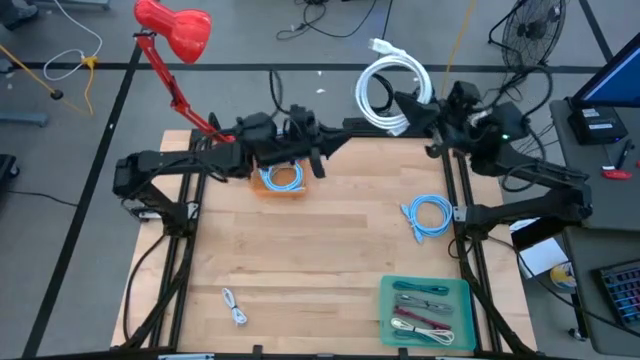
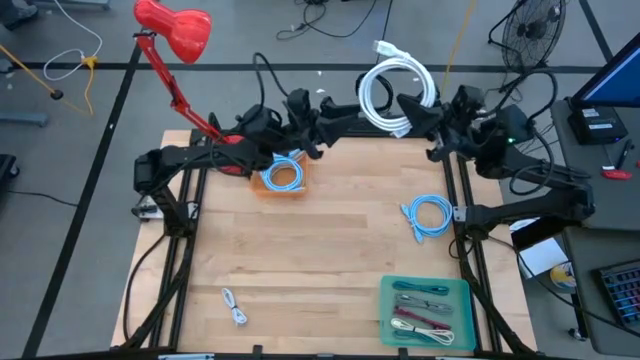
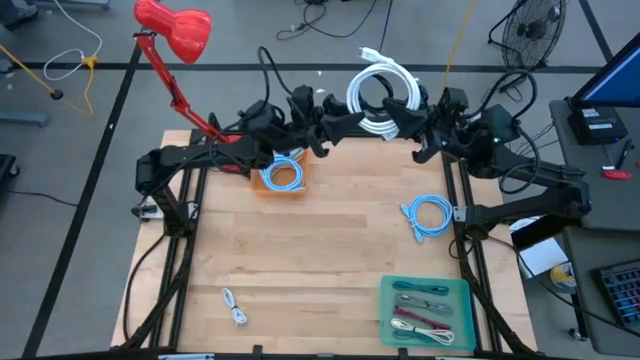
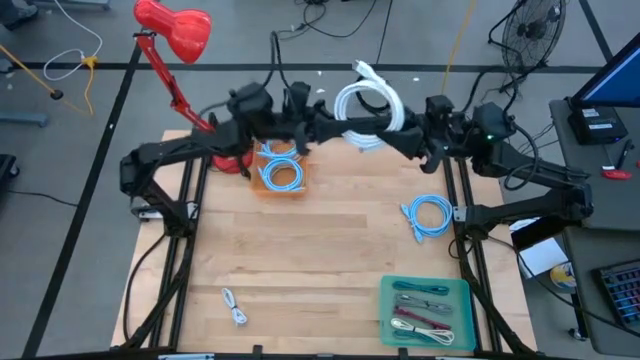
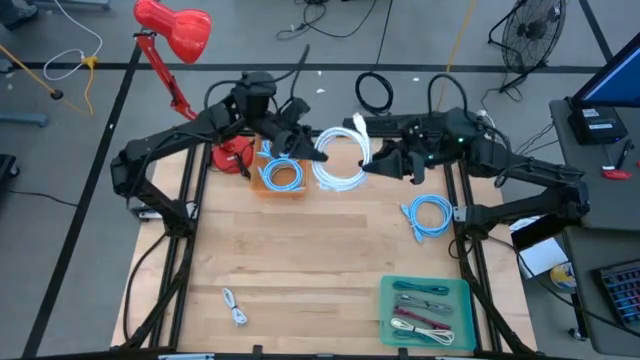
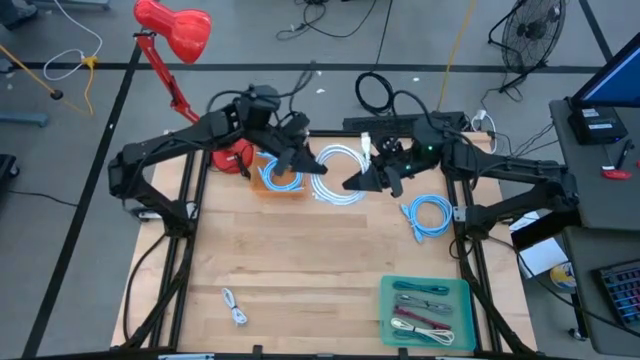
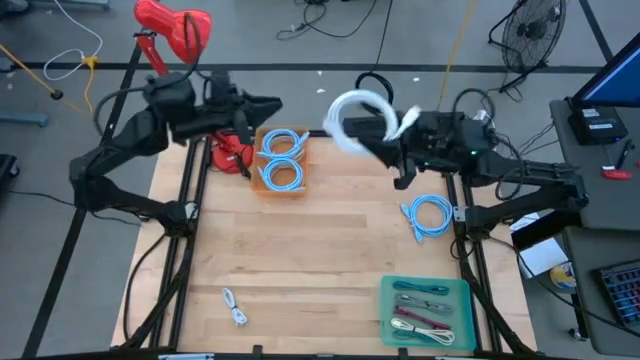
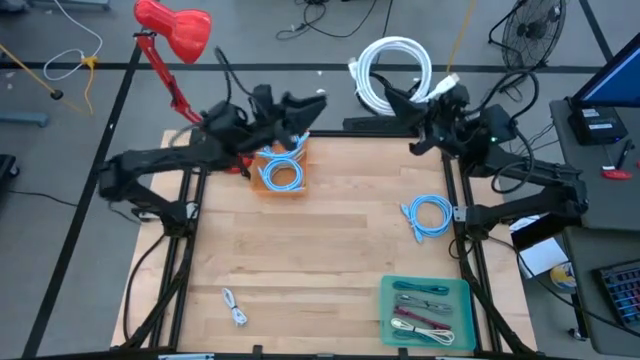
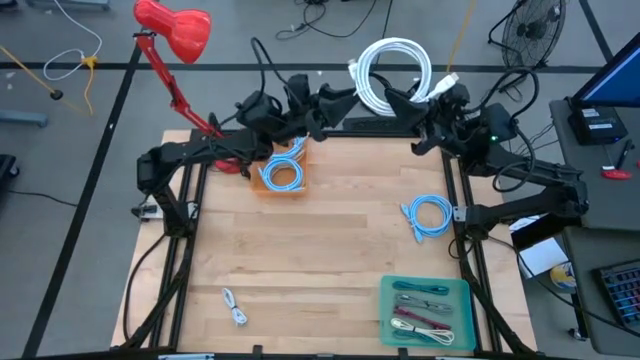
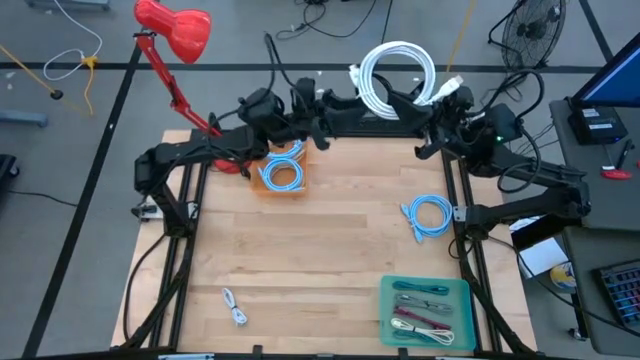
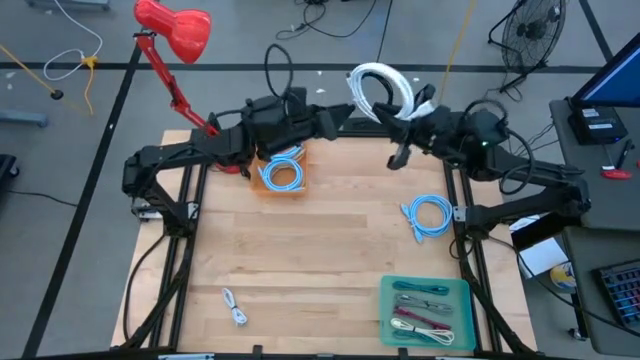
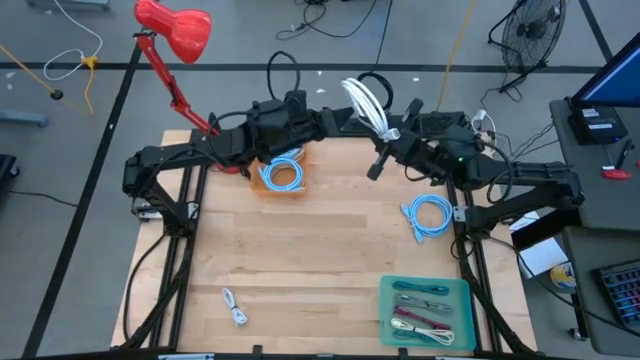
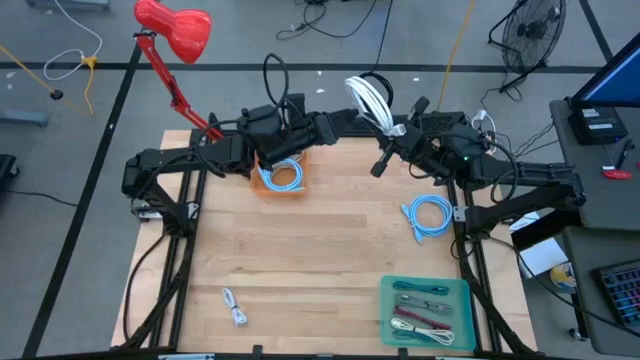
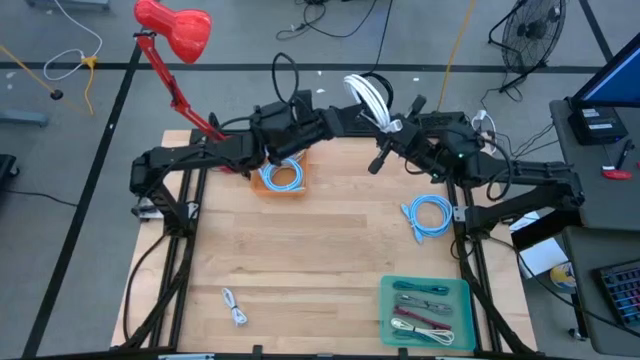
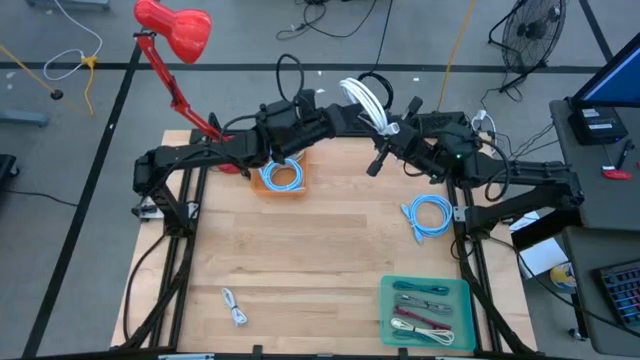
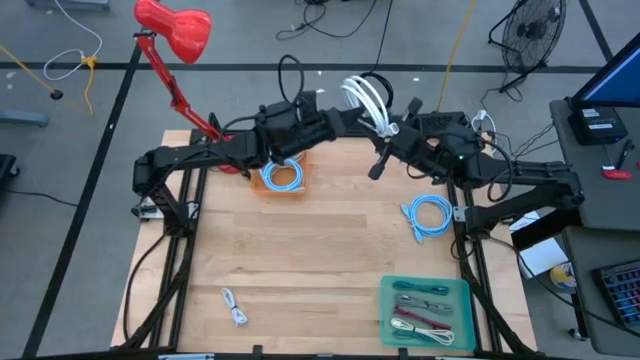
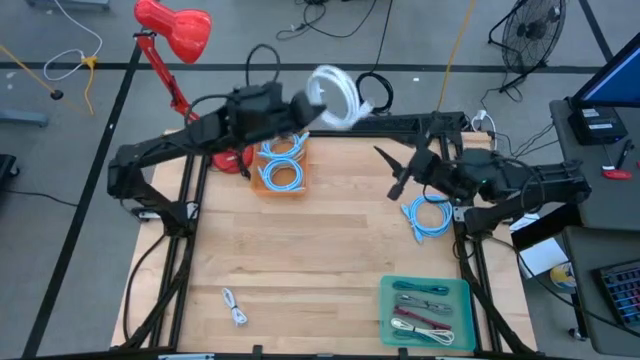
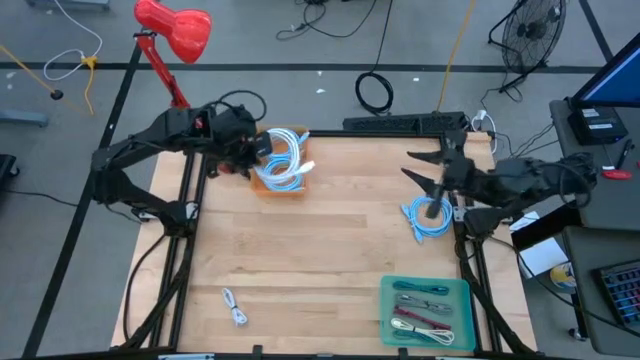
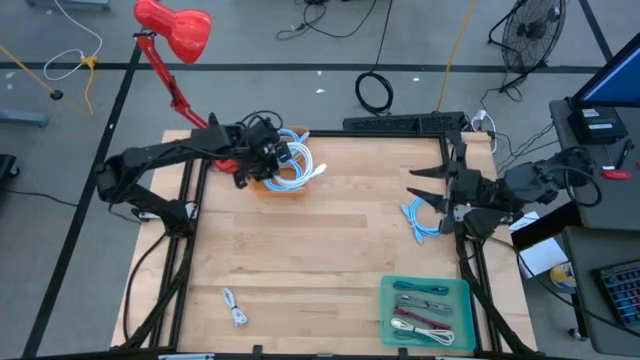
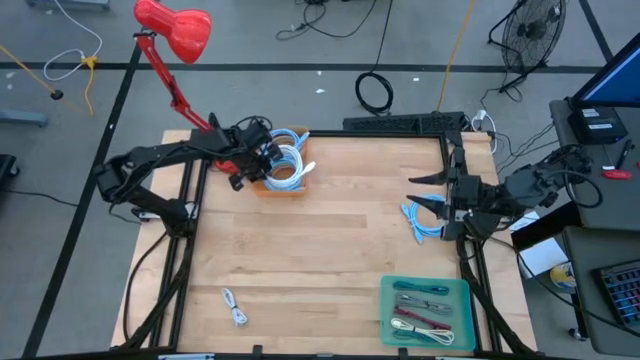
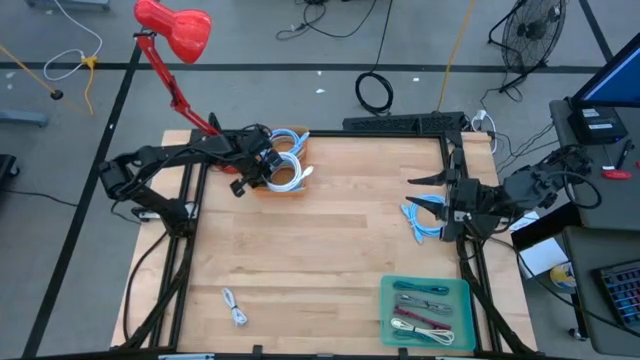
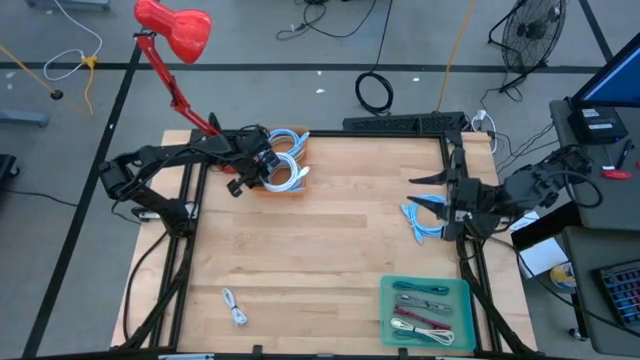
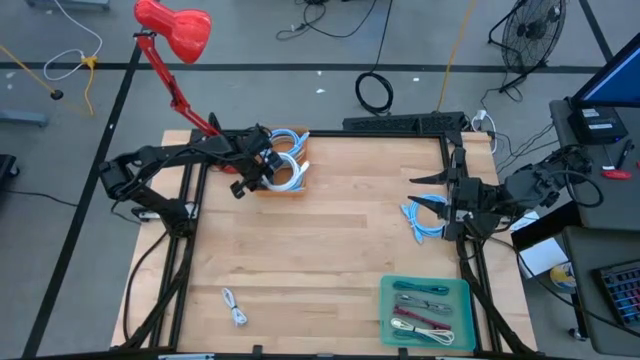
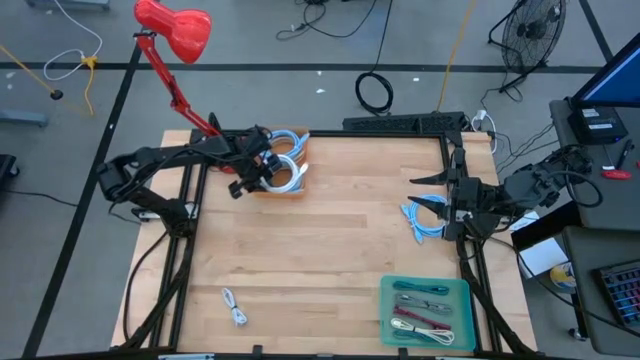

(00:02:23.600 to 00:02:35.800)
Task: Pick & Place USB Port
Put the white wire cable into the orange bin

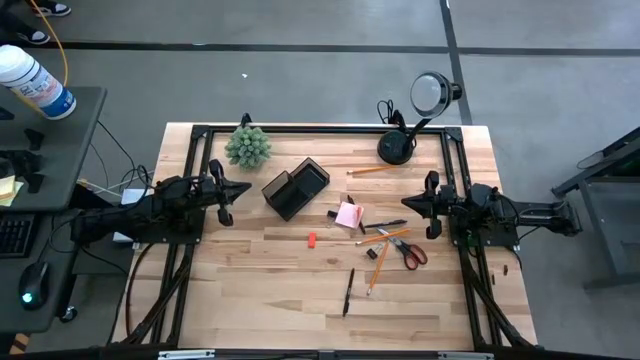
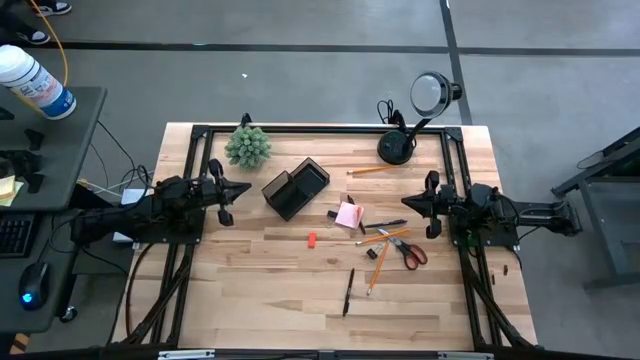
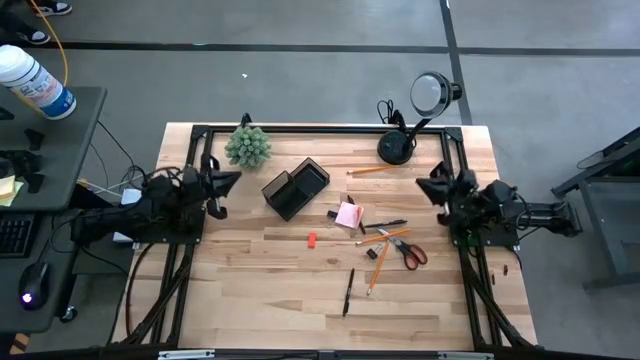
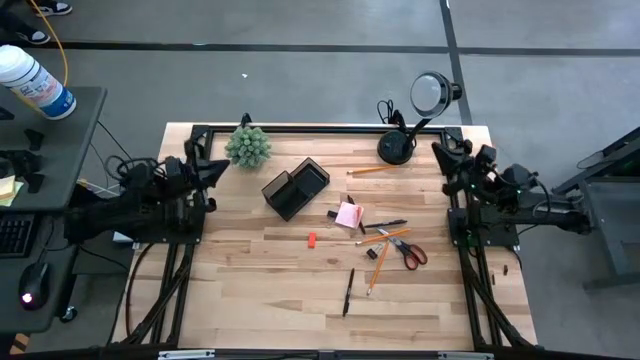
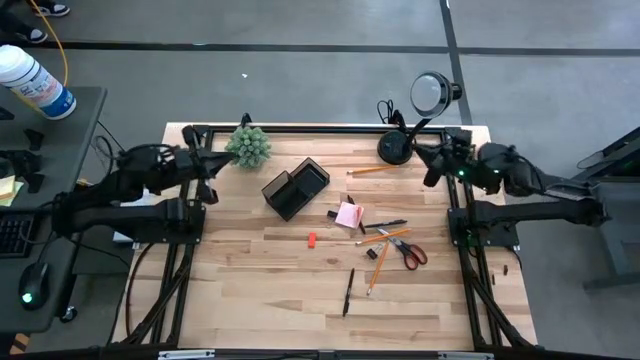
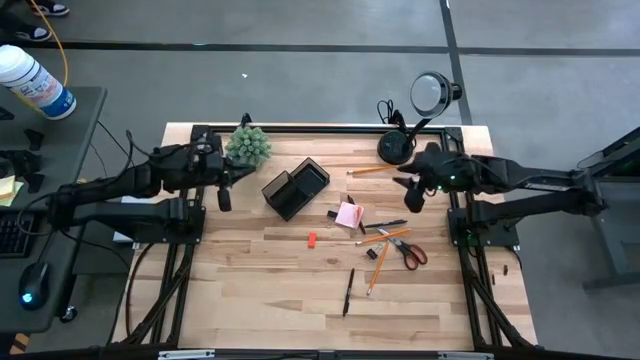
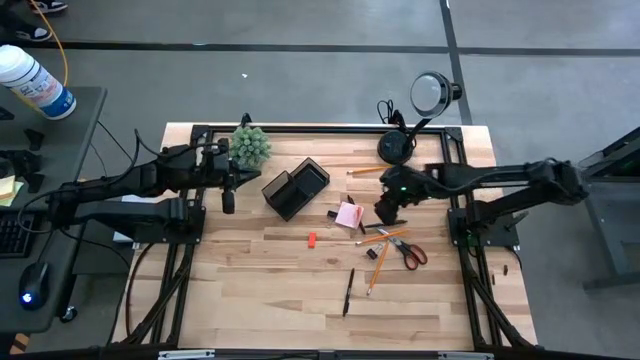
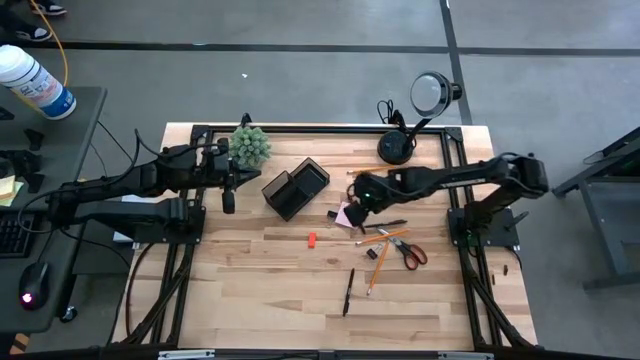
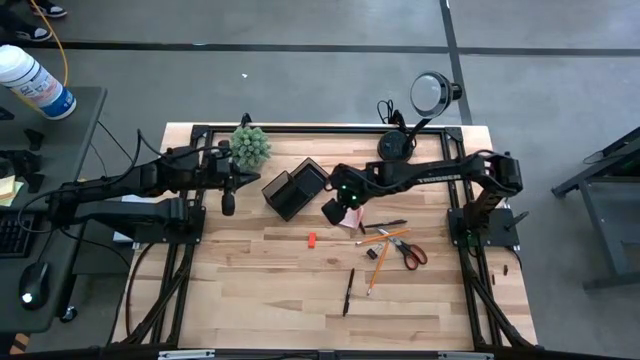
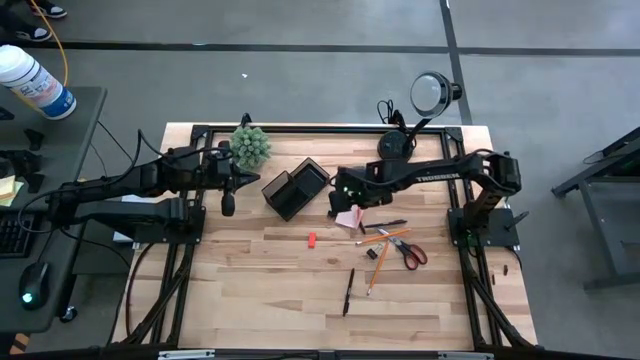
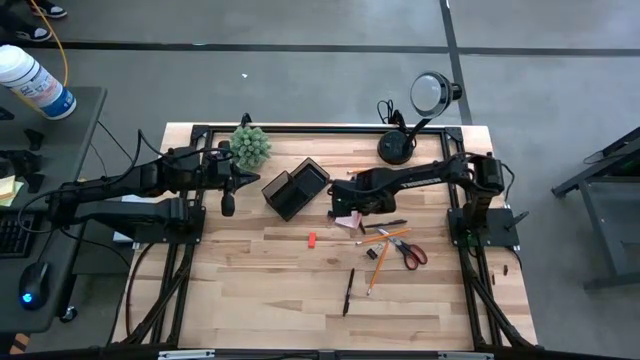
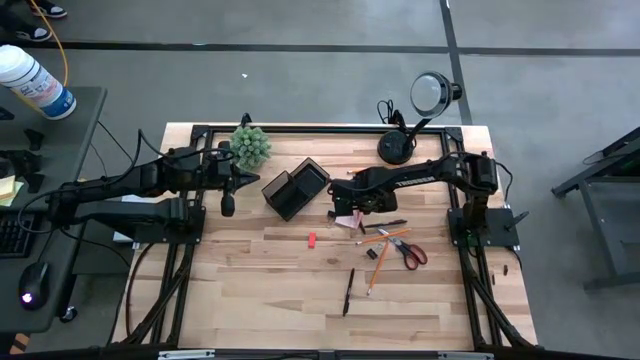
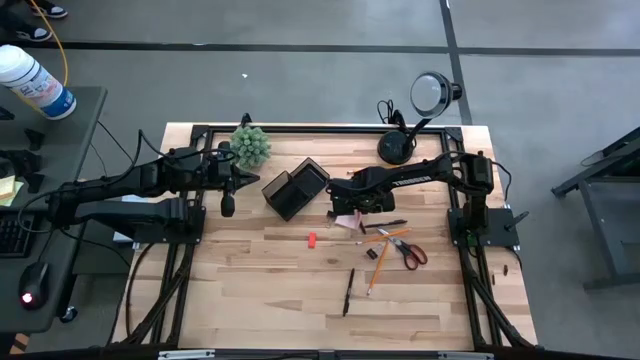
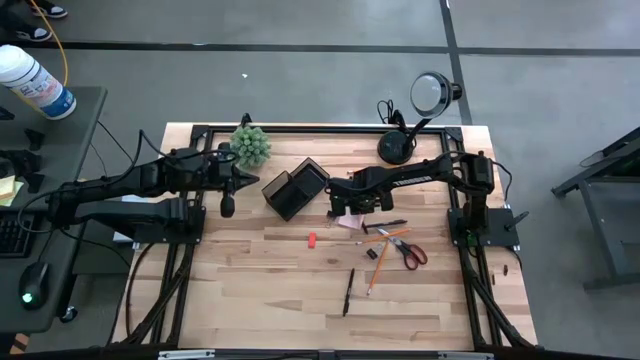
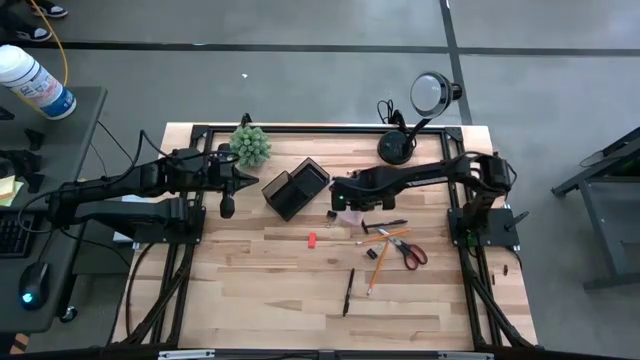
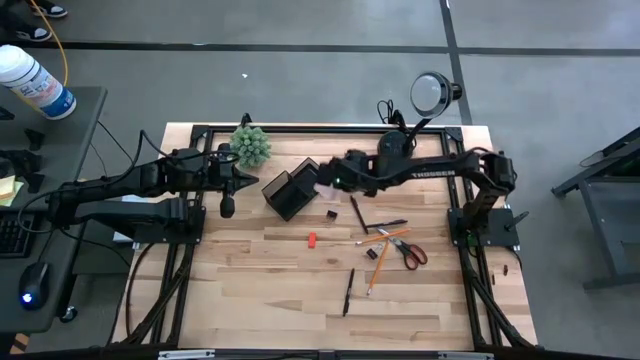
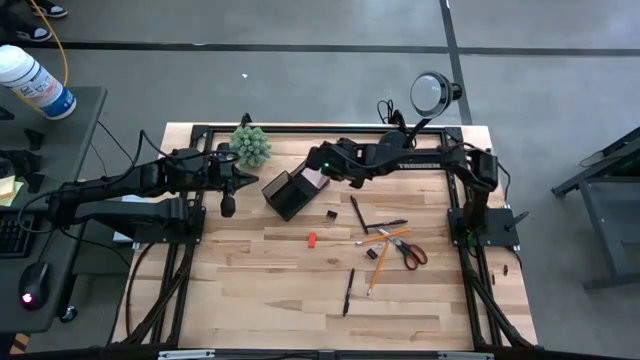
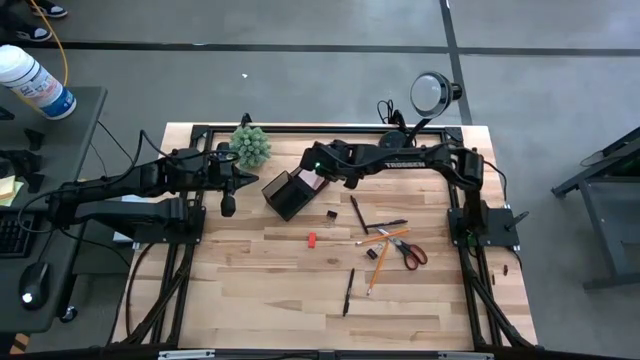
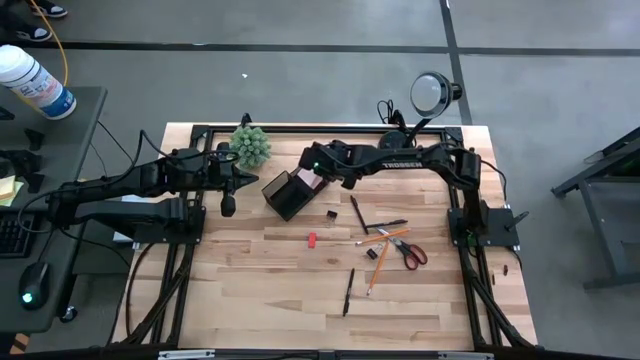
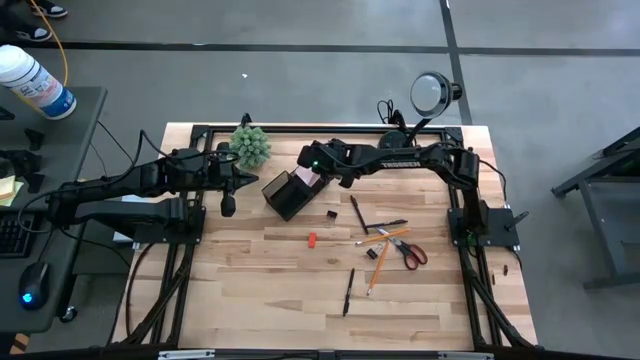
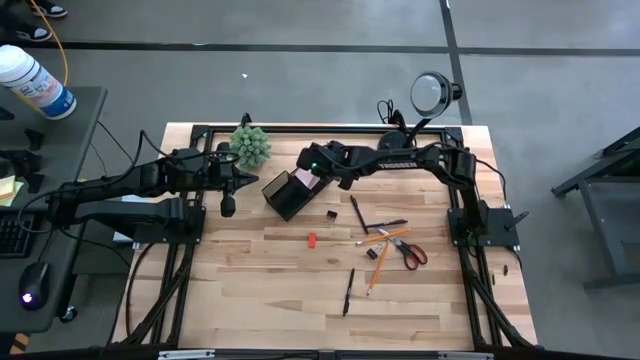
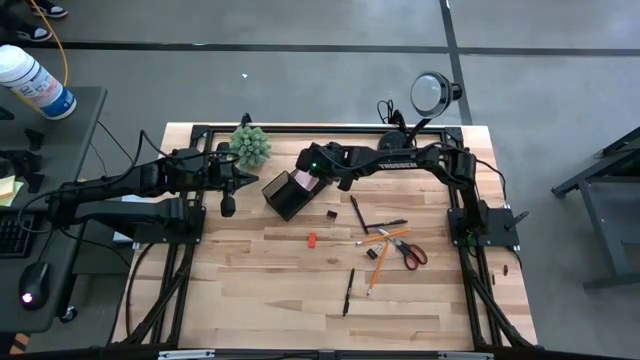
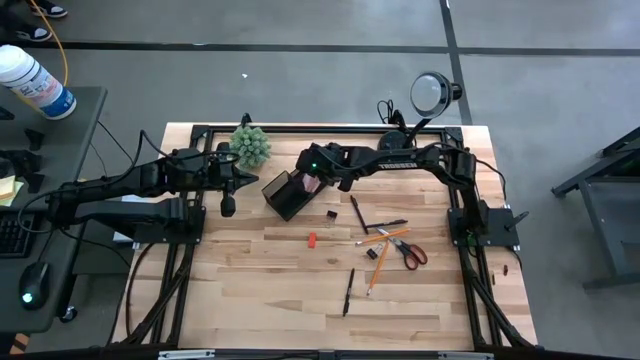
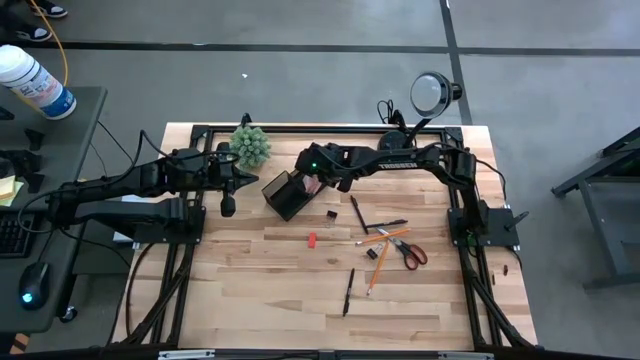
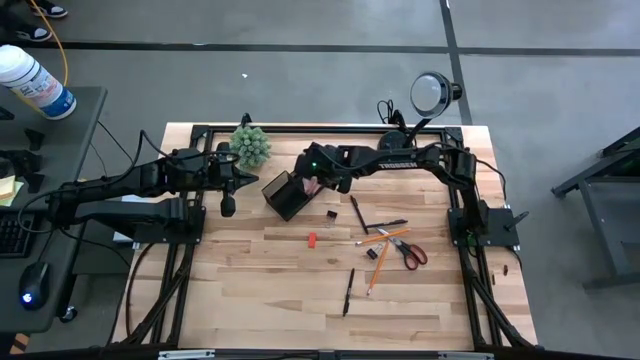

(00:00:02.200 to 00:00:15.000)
Task: Pick and place office supplies into organizer
Put the pink sticky notes into the black desk organizer
